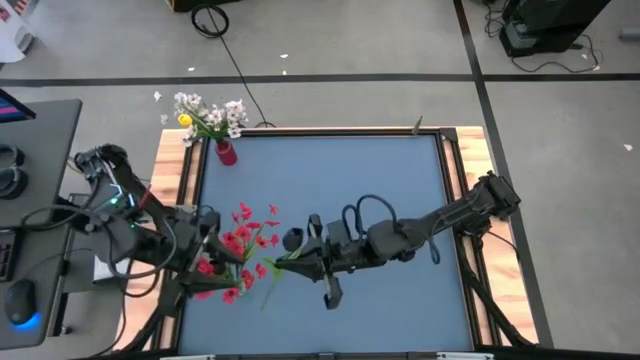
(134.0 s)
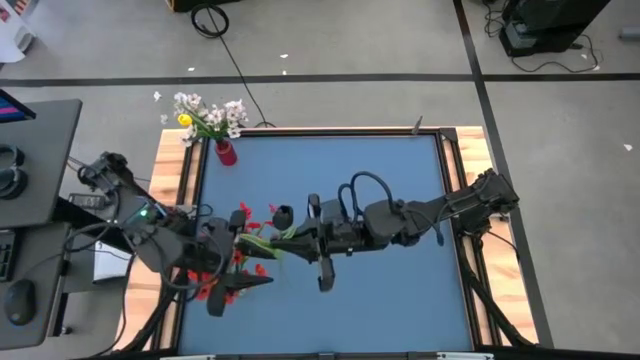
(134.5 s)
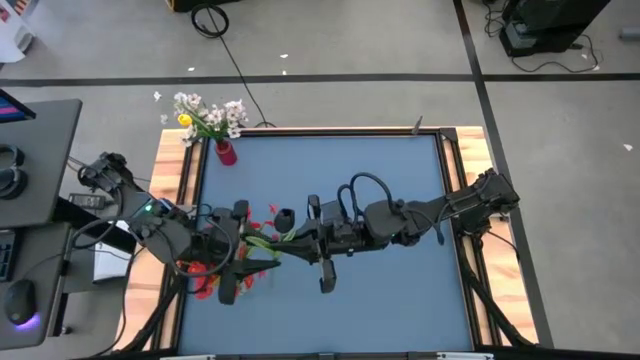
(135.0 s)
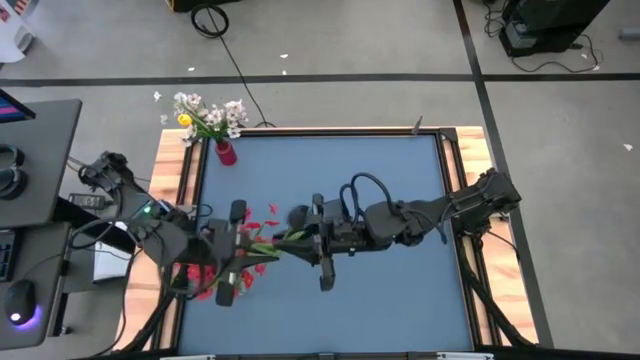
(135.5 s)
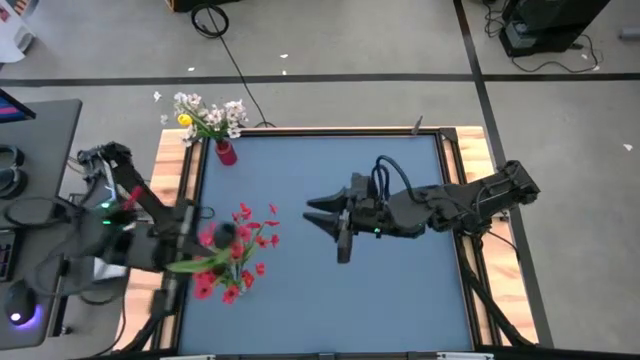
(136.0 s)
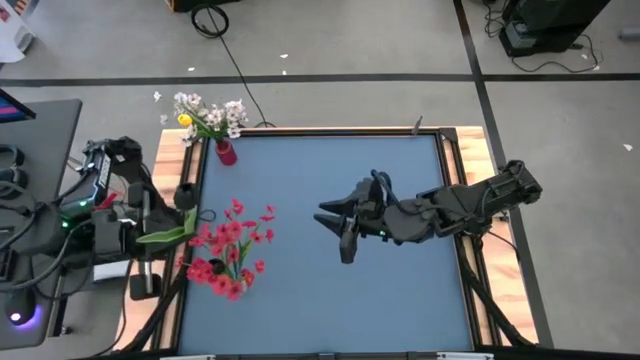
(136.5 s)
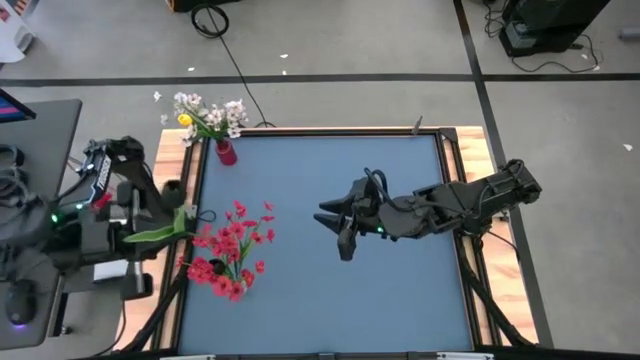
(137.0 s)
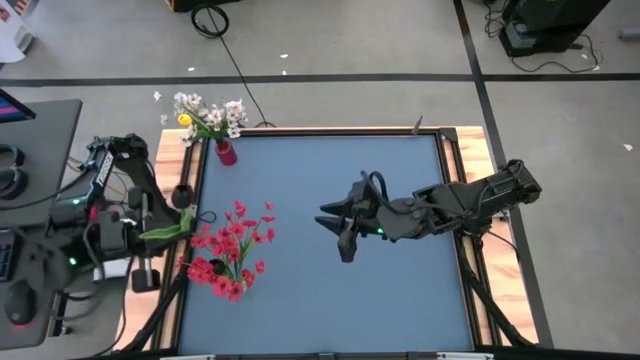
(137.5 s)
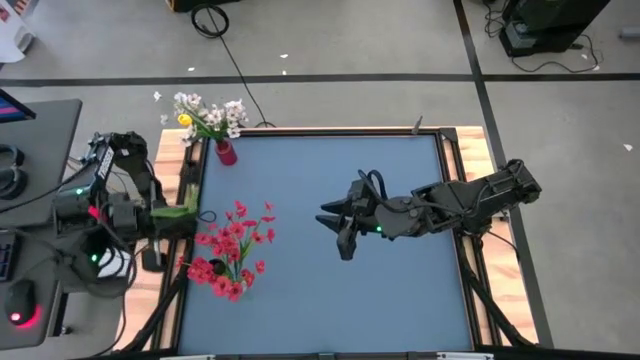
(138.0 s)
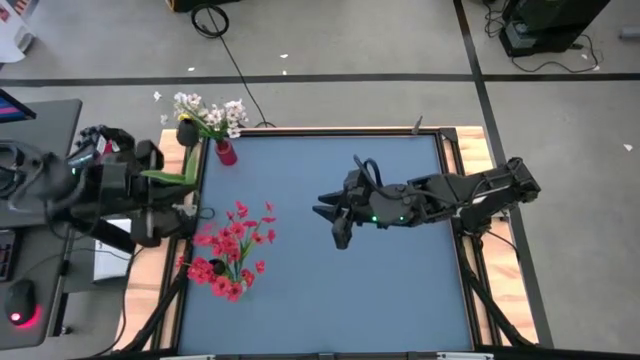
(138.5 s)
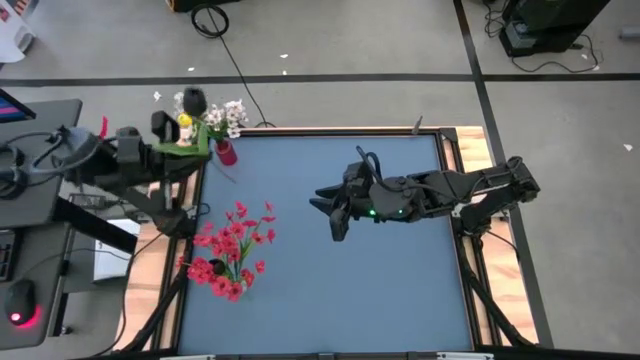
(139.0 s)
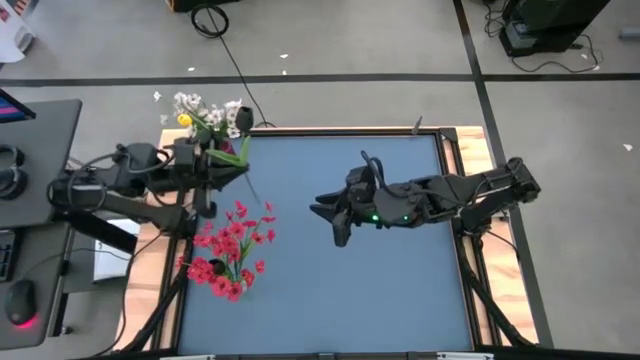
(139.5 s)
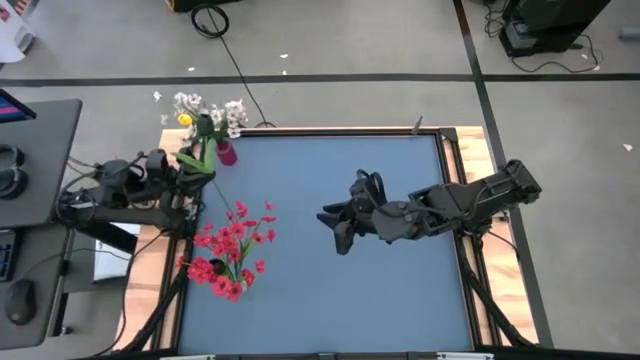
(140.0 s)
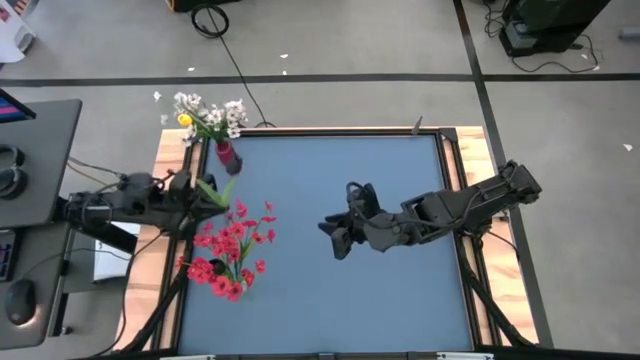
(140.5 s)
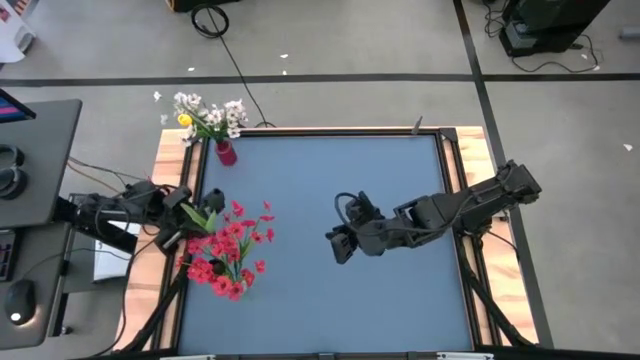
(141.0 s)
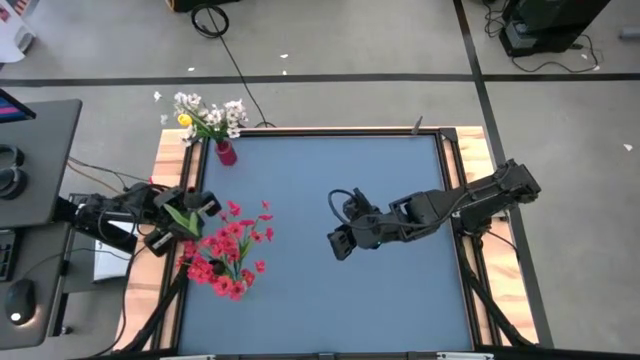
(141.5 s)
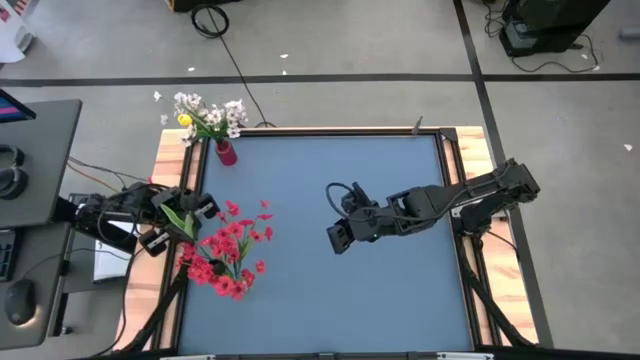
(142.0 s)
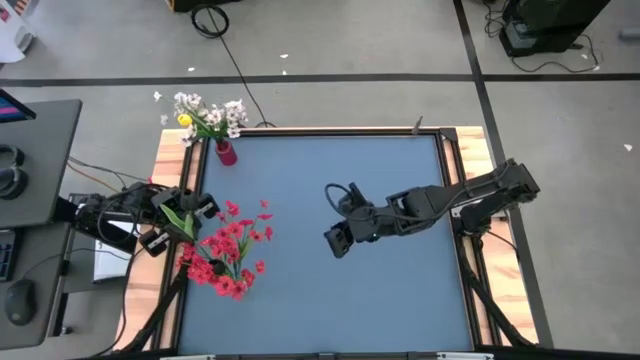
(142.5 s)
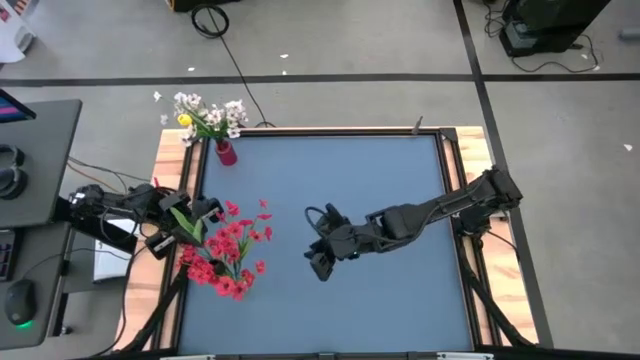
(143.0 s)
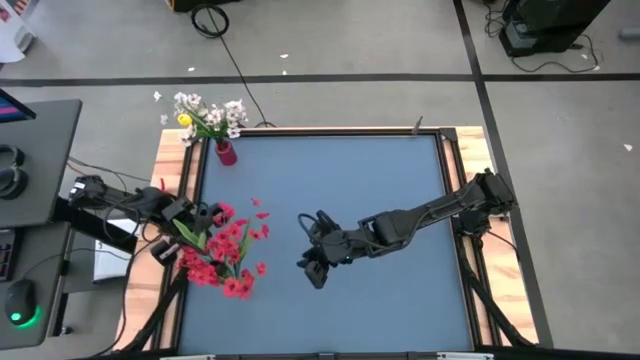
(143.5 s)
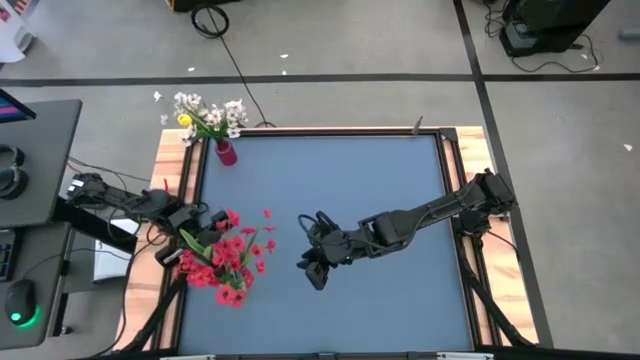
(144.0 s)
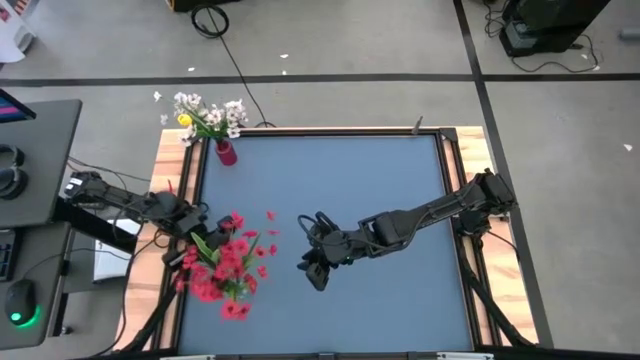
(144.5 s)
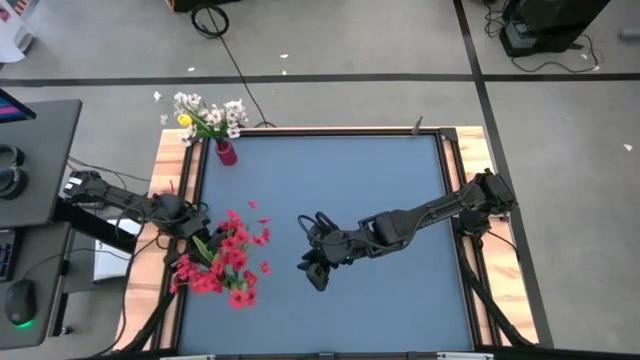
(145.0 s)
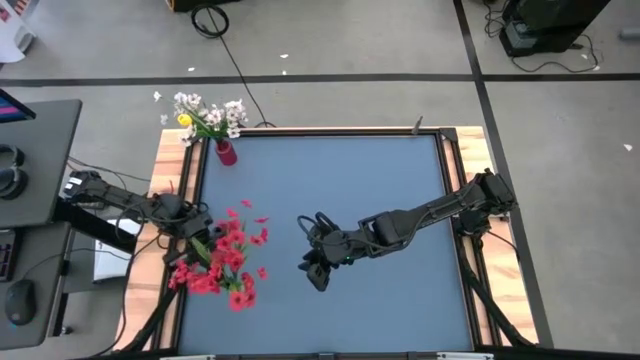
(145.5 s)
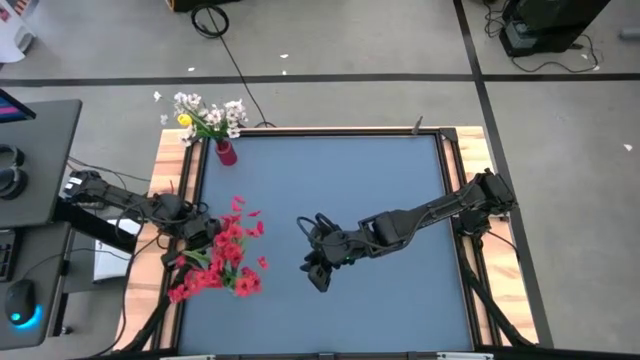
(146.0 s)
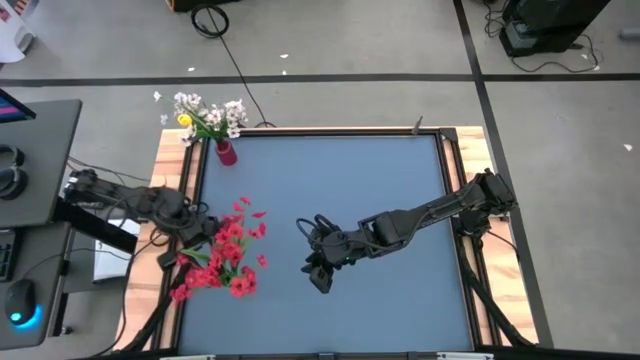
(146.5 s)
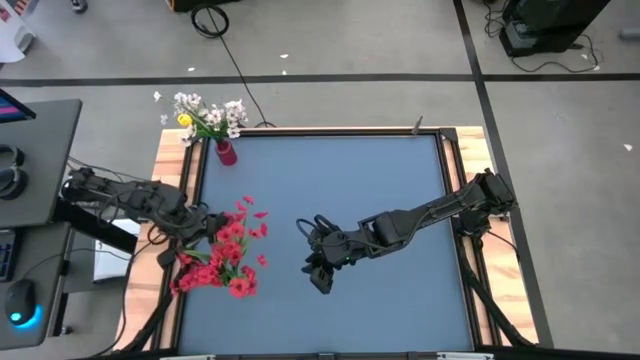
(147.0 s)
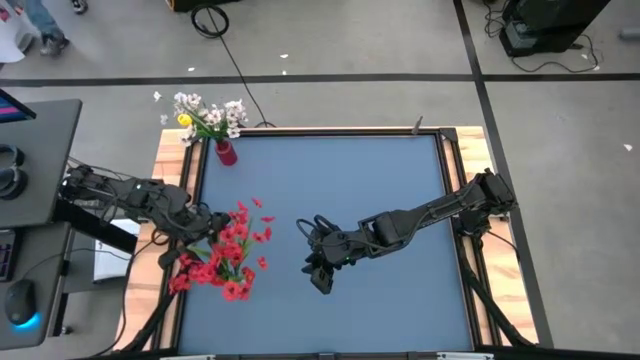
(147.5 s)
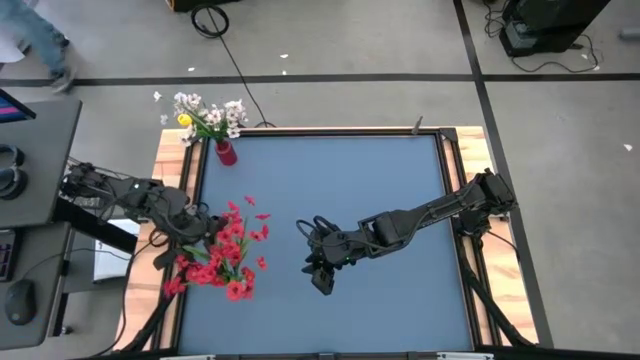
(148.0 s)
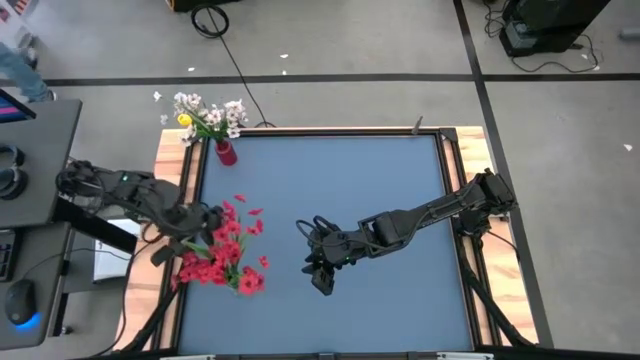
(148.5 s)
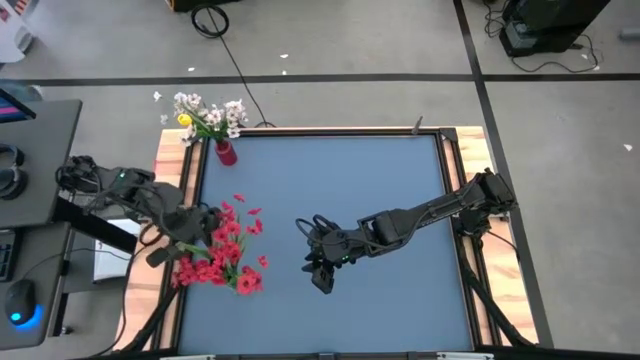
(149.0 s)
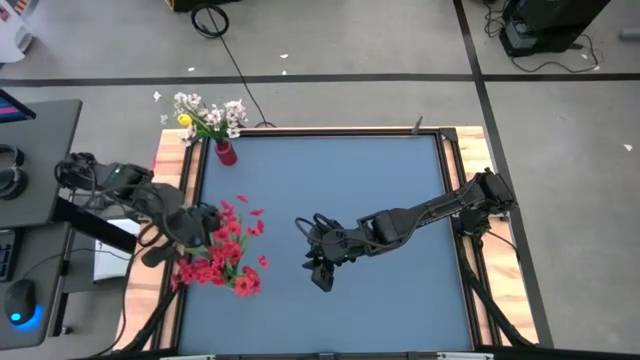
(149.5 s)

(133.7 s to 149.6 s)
Task: Sort flowers into vase by color
Put the black flower into the transparent vase

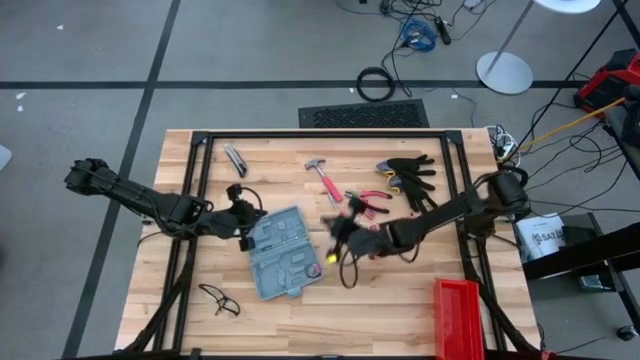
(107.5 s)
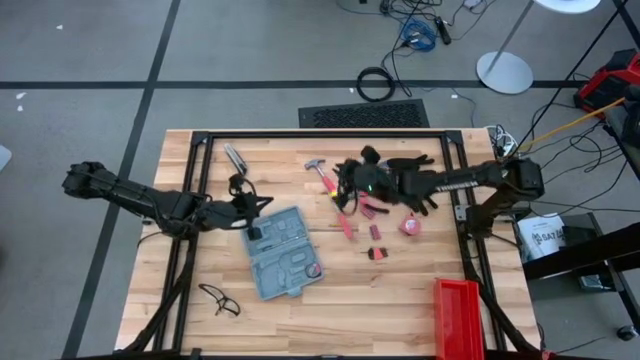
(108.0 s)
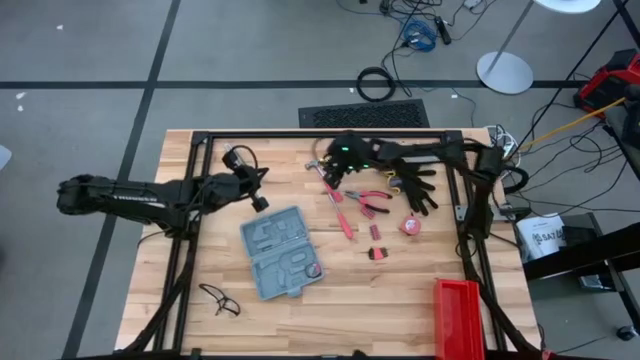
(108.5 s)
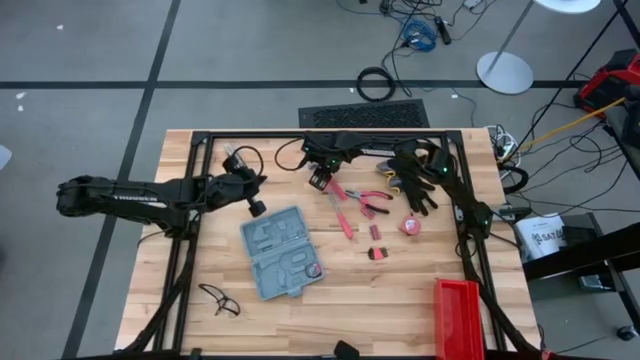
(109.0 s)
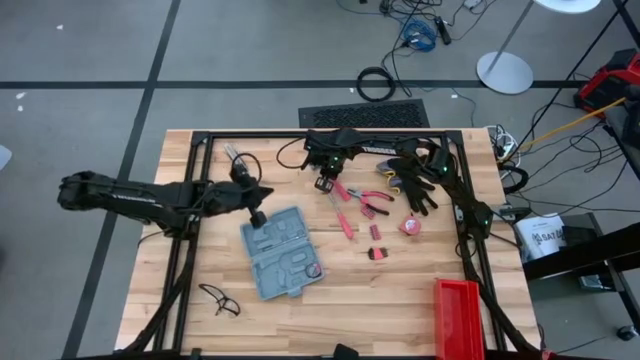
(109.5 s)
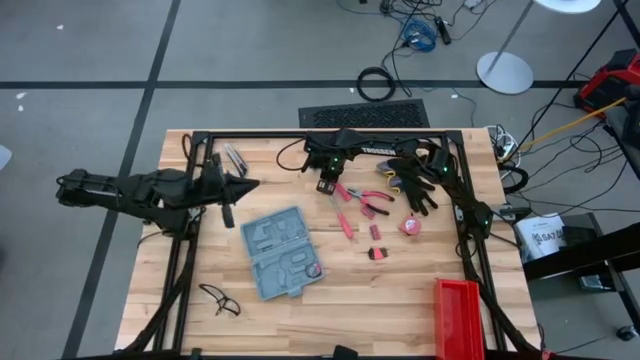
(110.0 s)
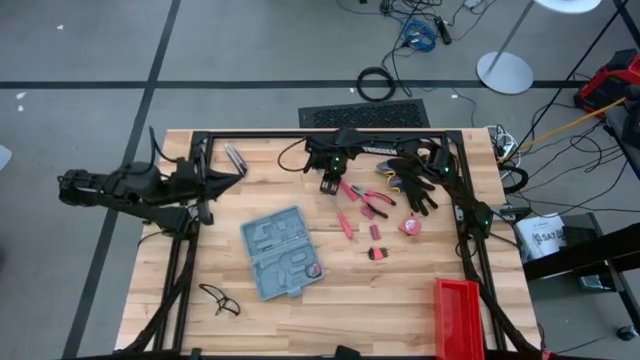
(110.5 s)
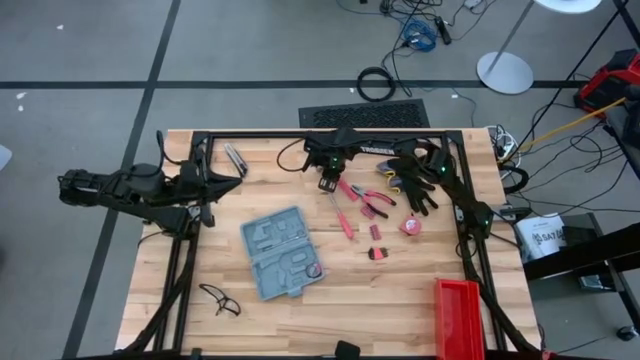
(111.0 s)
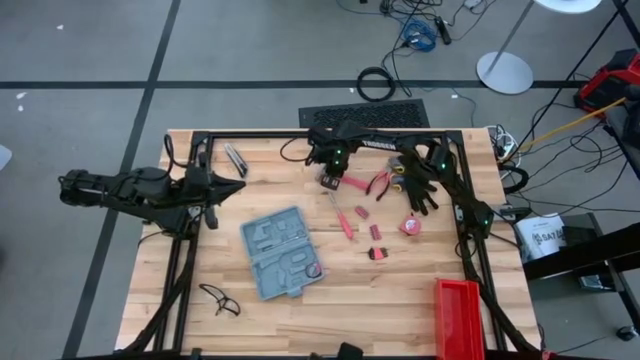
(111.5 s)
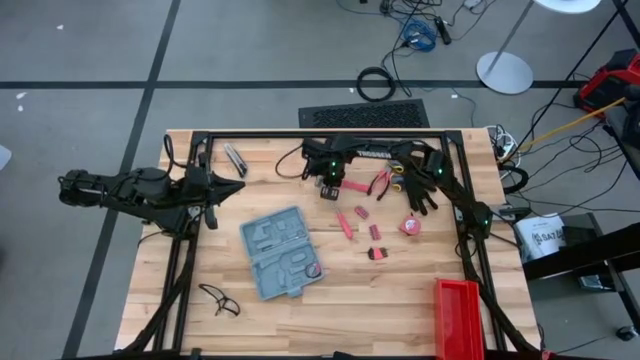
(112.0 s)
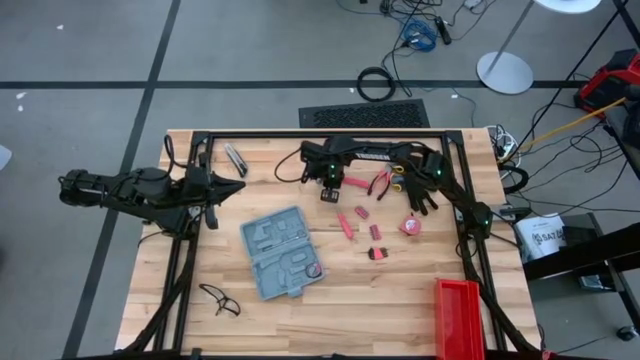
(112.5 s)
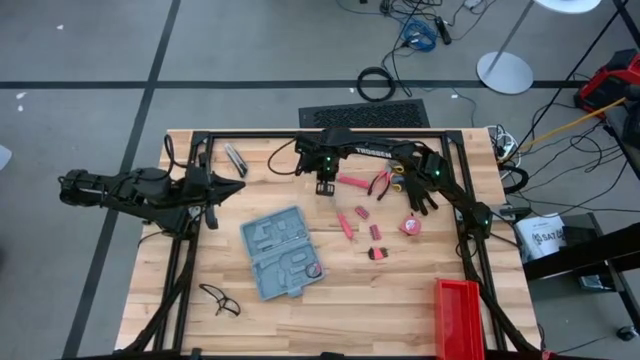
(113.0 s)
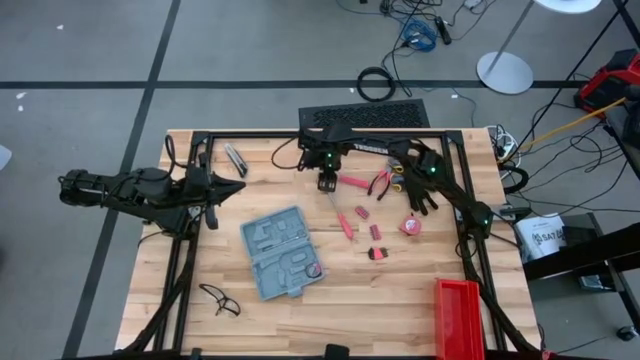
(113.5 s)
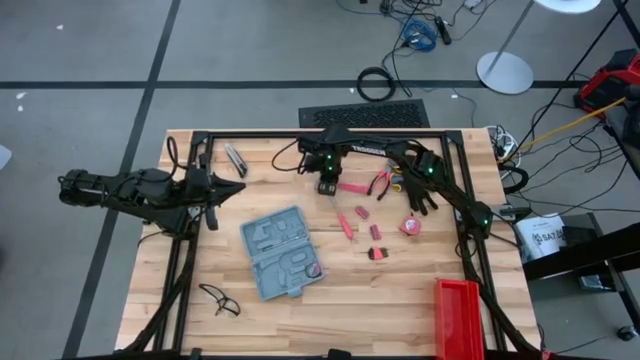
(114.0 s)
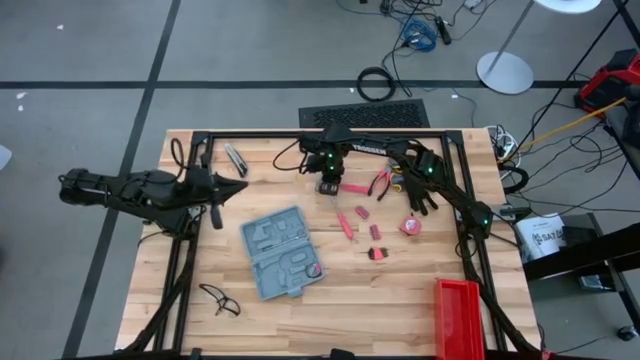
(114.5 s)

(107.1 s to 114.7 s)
Task: prefit tool cases
Put the pink hammer into the gray prefit tool case
